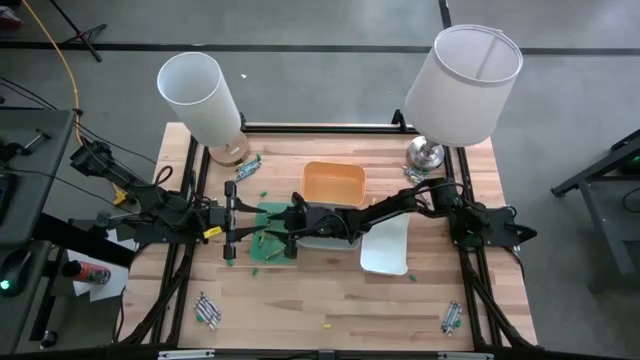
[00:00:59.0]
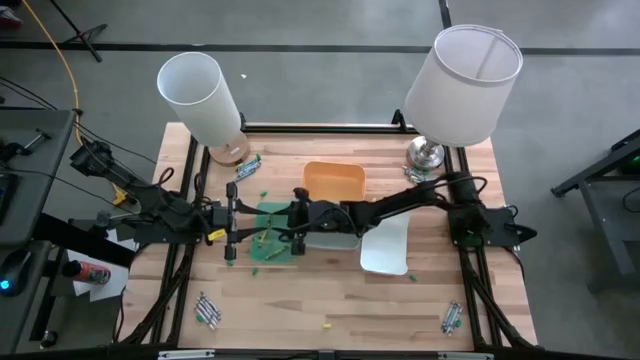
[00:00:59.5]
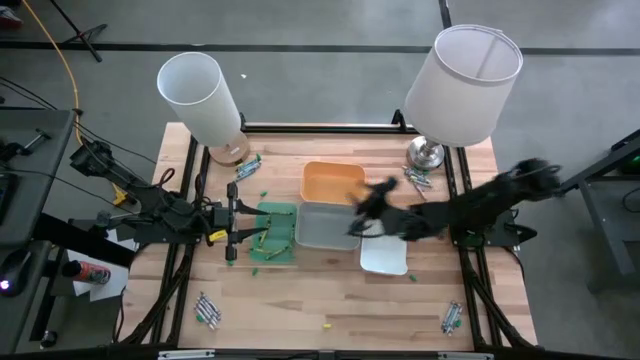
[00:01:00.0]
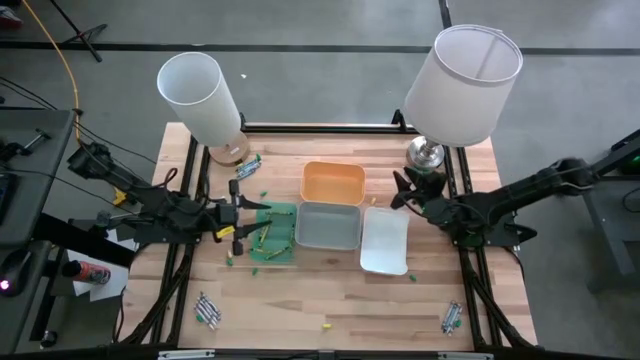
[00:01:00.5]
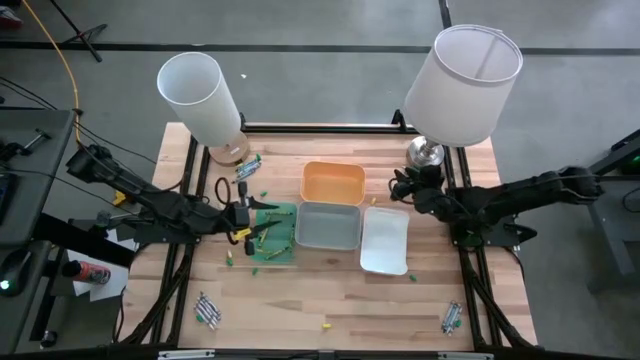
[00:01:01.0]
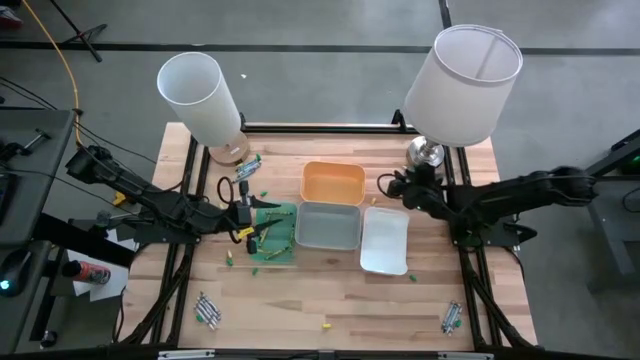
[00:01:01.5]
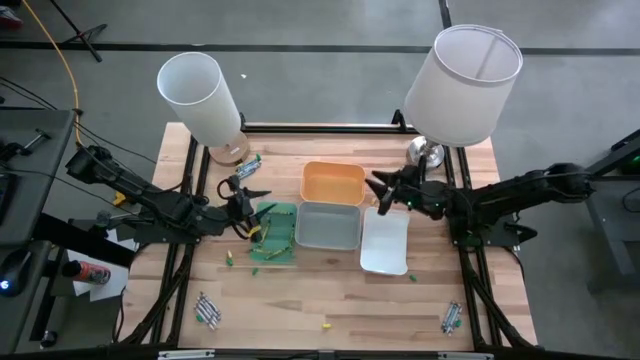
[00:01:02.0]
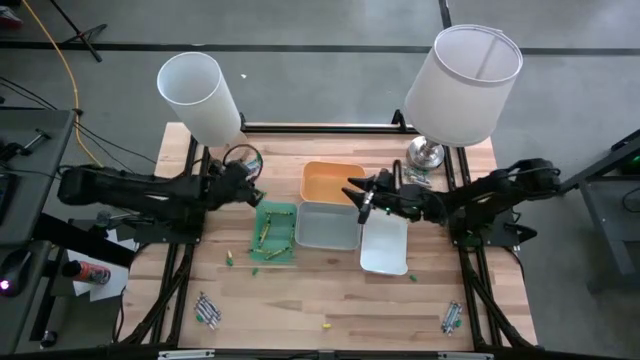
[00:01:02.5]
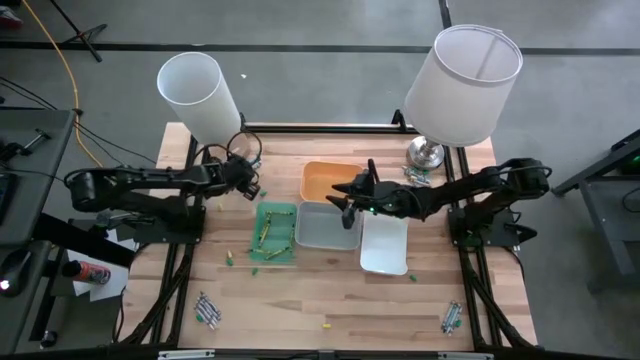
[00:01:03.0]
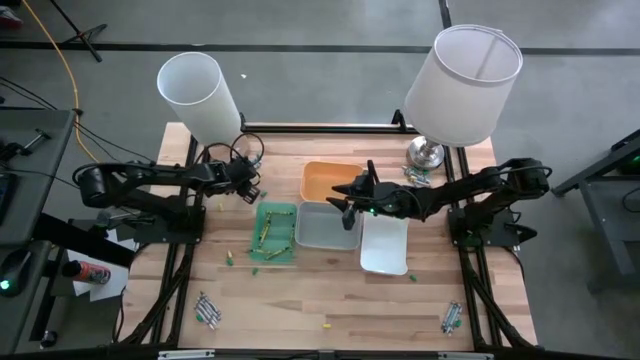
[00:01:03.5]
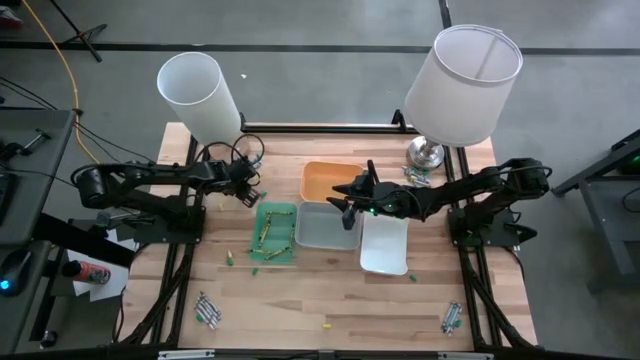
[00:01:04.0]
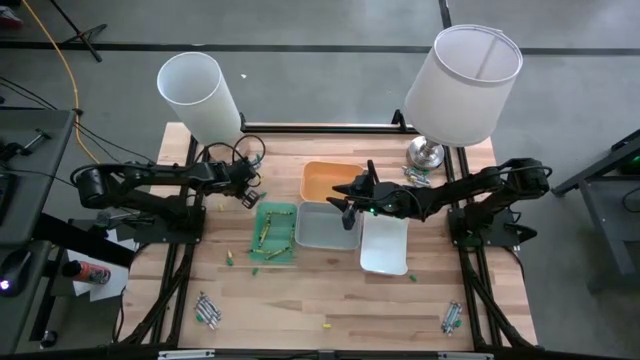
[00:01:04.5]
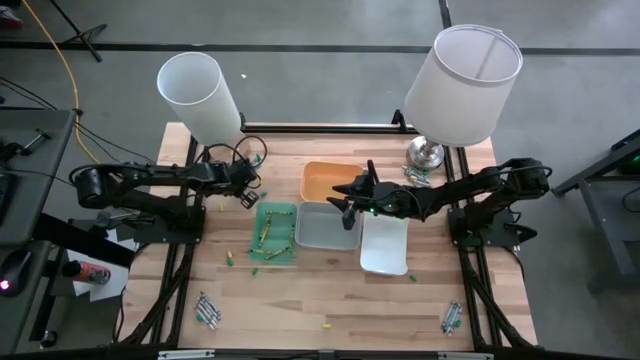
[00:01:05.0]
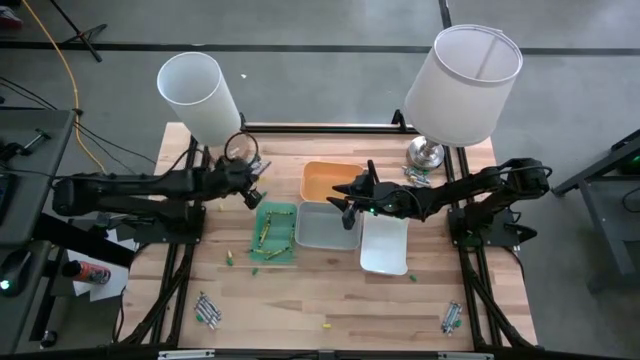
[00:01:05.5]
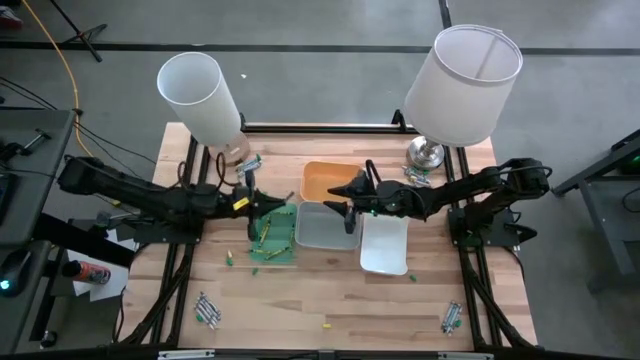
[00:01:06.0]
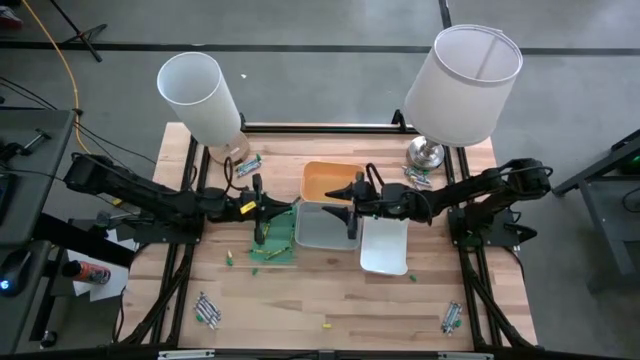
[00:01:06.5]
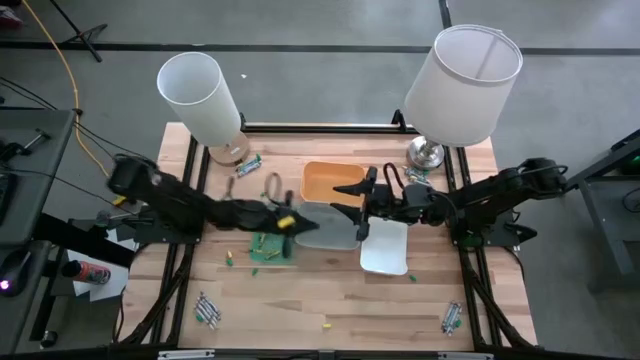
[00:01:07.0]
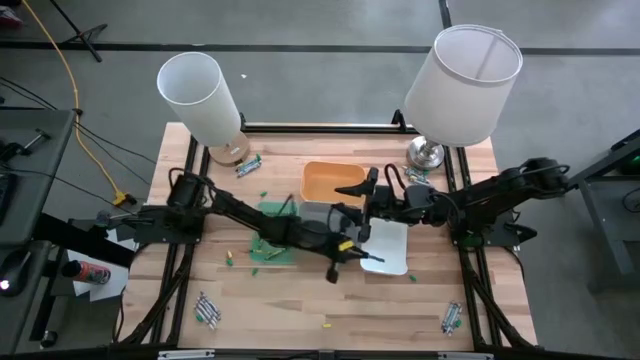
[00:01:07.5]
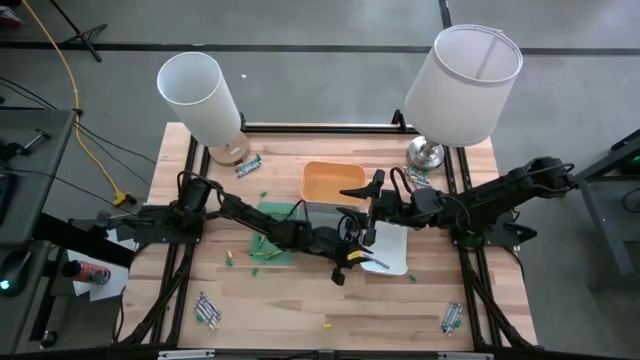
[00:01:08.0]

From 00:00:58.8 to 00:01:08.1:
Task: Sort crayons
Put the blue crayon into the white bin

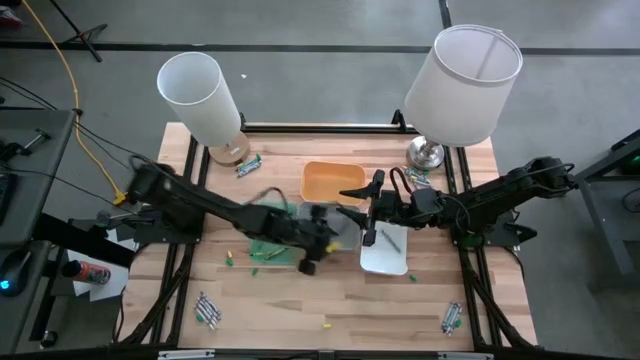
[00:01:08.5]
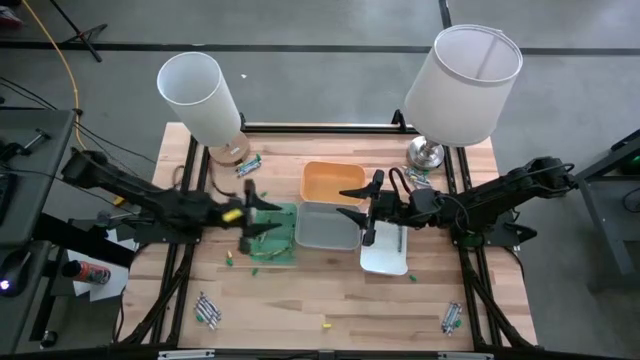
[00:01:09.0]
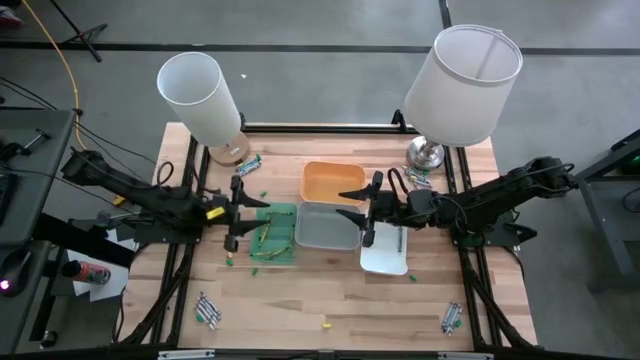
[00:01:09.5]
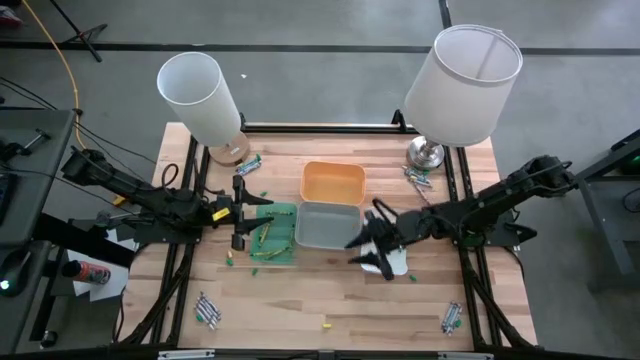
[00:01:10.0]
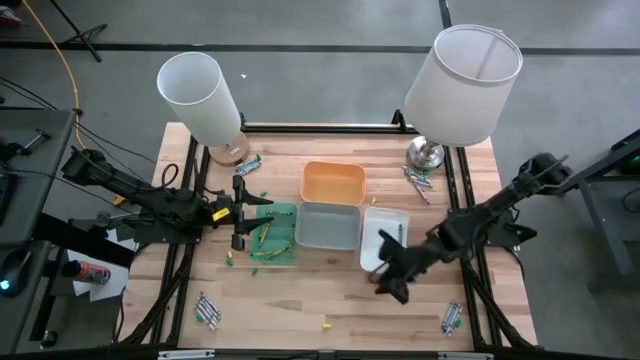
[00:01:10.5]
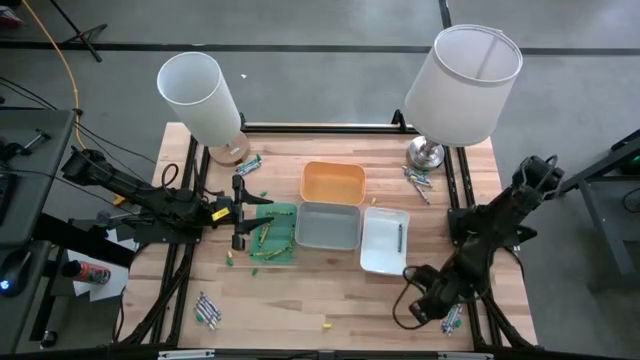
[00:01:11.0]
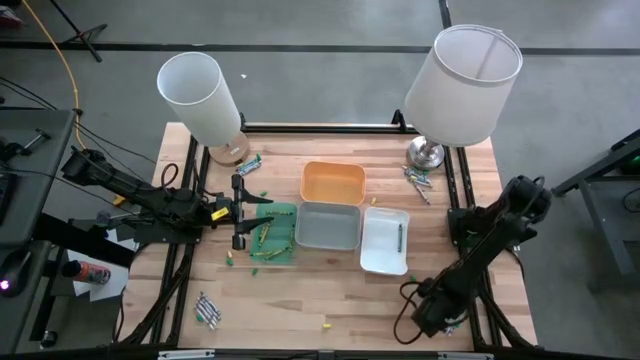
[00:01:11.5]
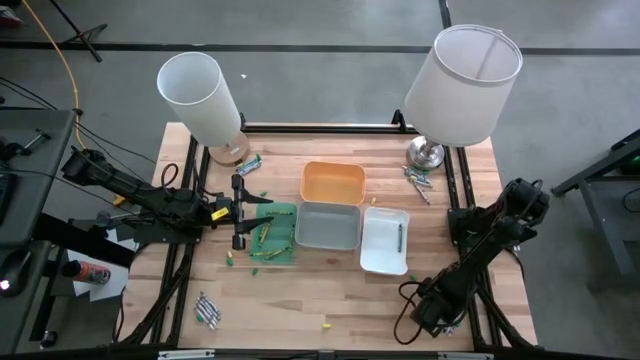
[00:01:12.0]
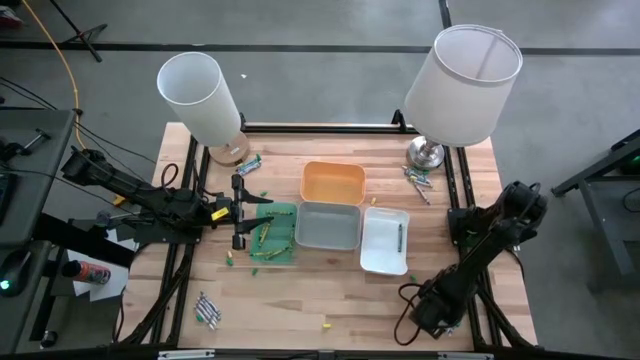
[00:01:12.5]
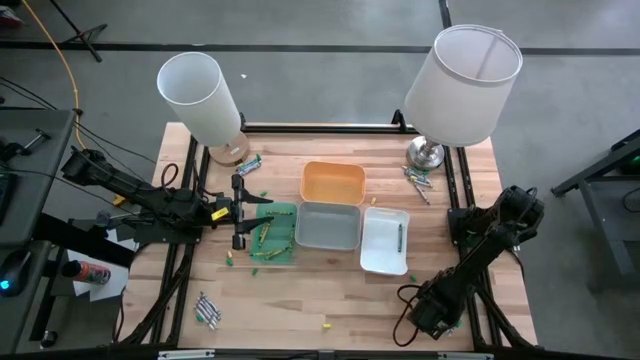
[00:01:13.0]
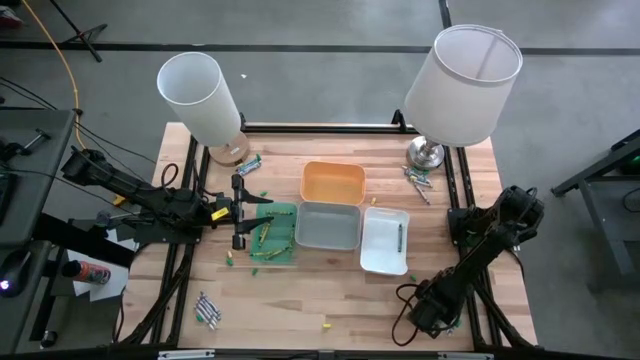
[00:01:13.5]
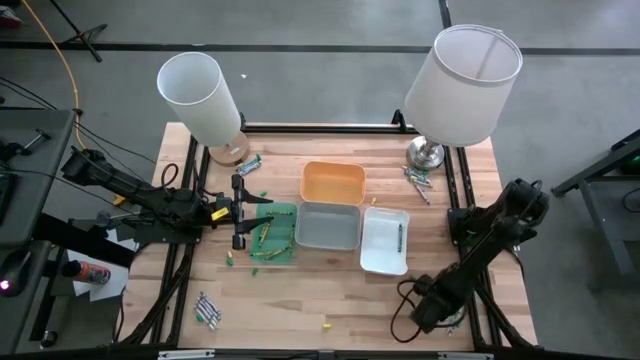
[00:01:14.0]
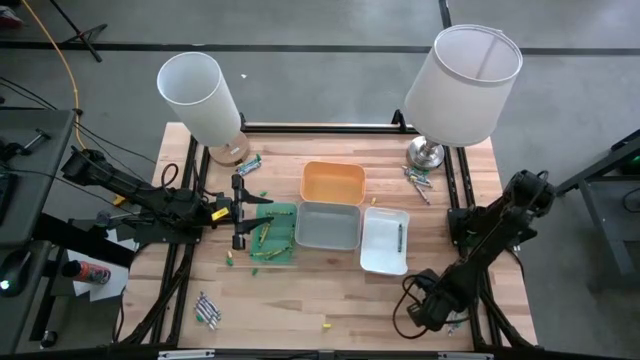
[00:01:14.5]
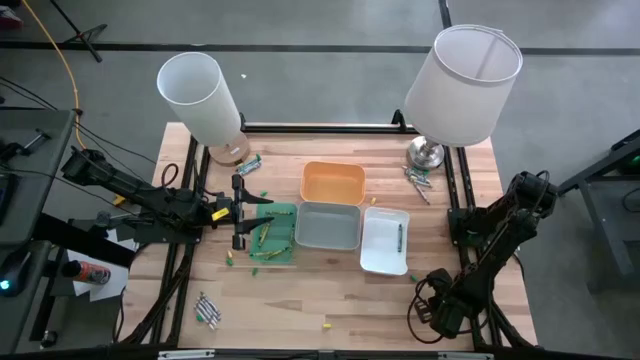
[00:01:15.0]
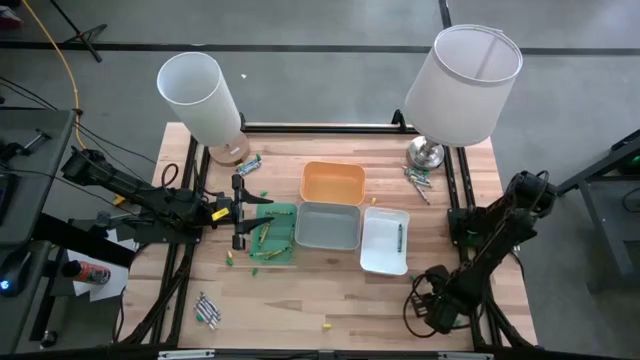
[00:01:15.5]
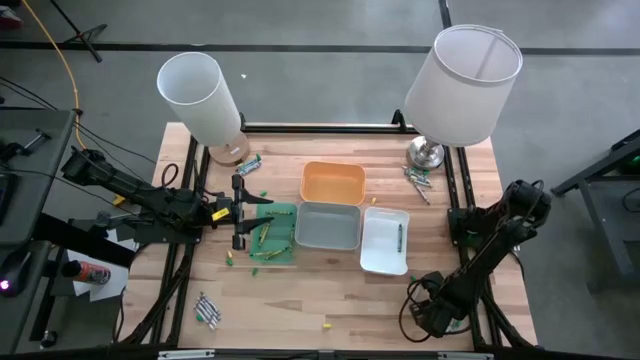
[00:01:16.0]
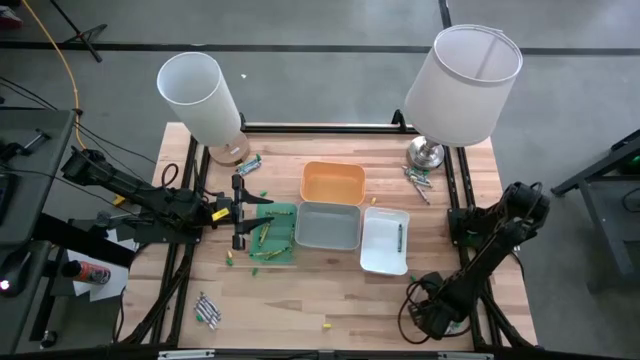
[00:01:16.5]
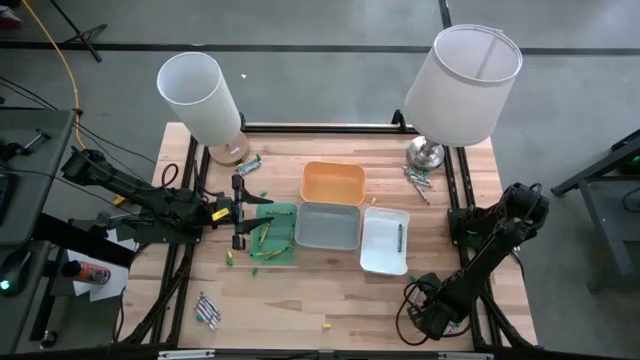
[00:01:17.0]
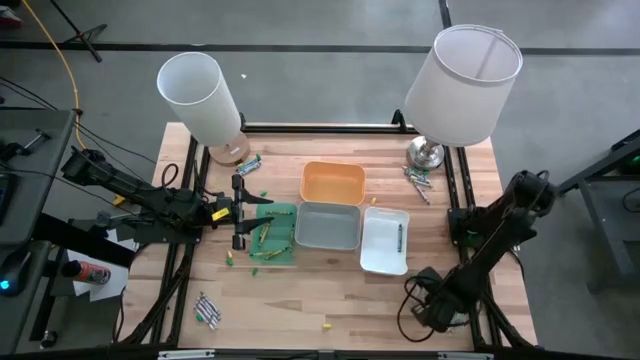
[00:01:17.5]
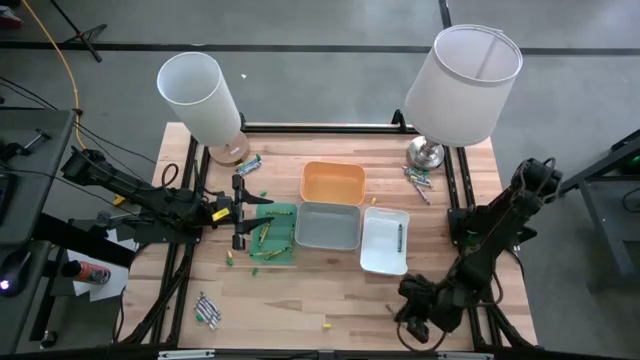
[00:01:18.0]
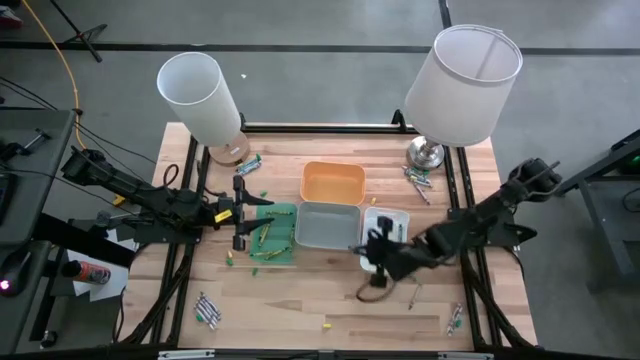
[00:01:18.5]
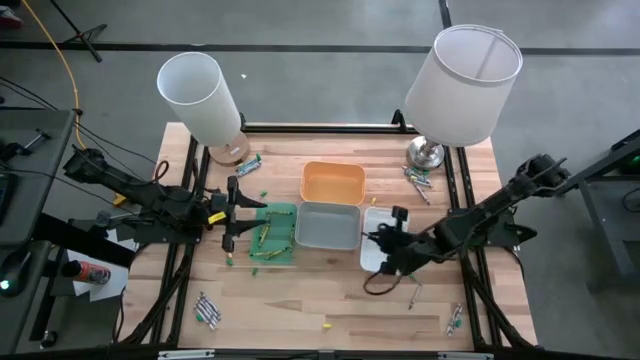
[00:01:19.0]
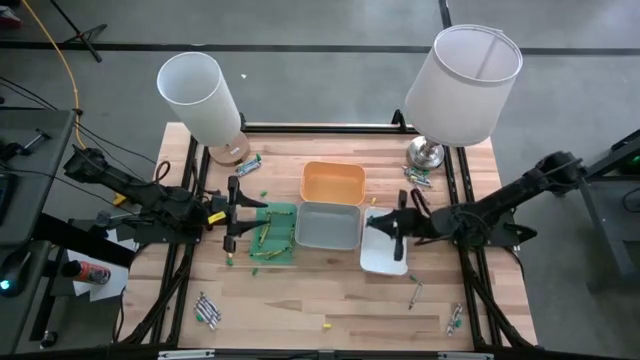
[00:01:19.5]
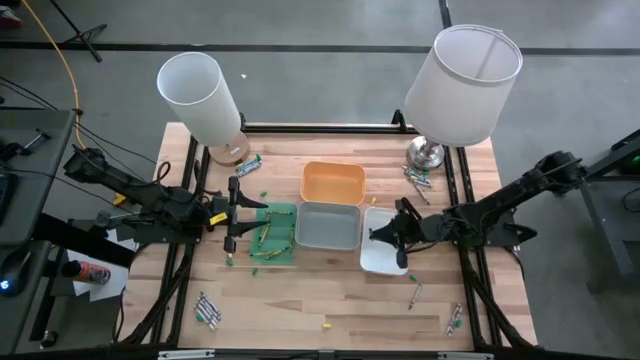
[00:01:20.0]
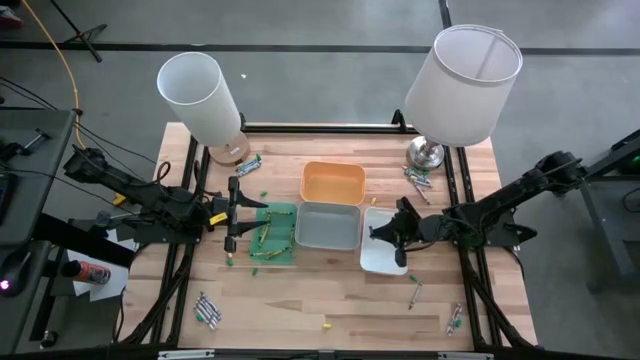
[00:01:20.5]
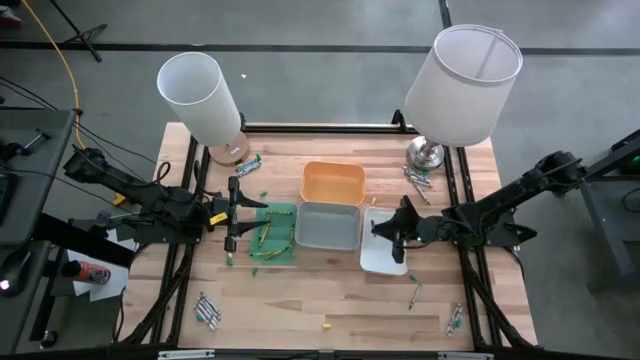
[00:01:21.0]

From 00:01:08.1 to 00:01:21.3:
Put the blue crayon into the white bin
